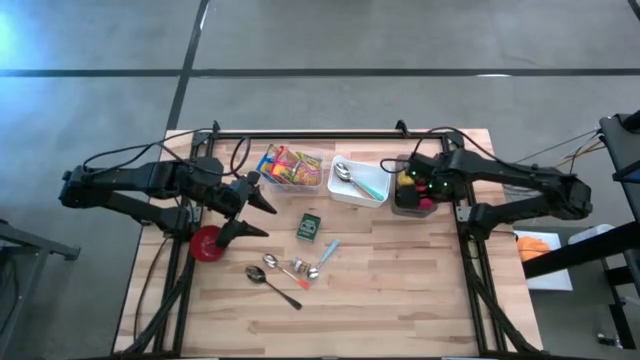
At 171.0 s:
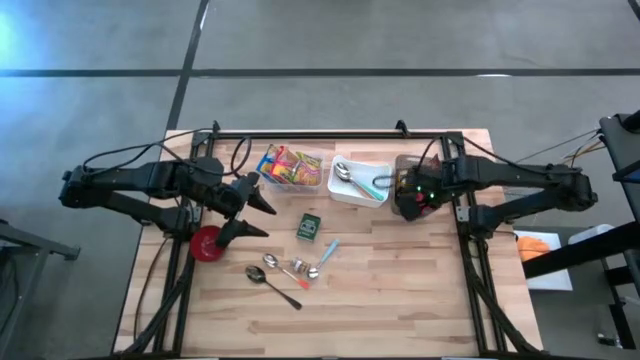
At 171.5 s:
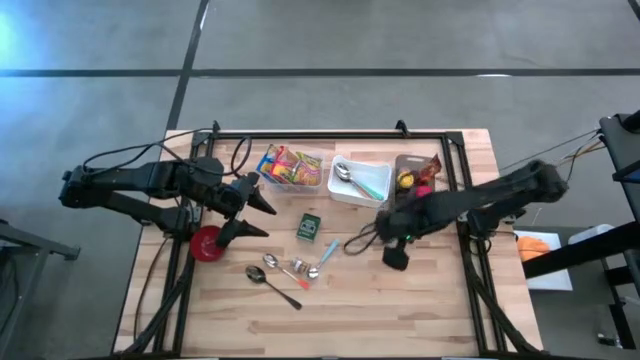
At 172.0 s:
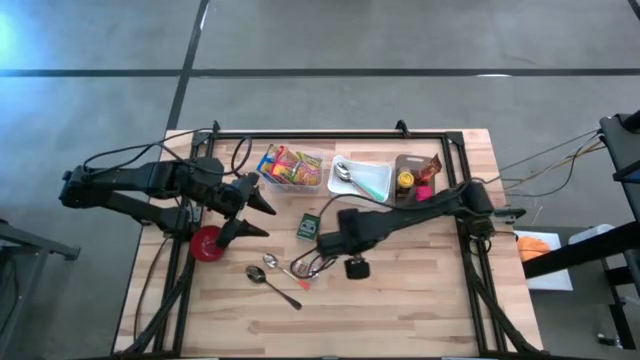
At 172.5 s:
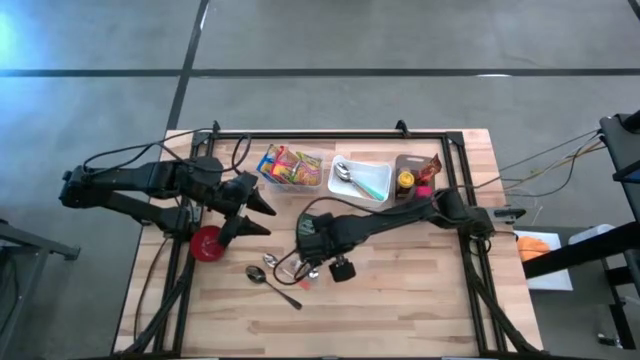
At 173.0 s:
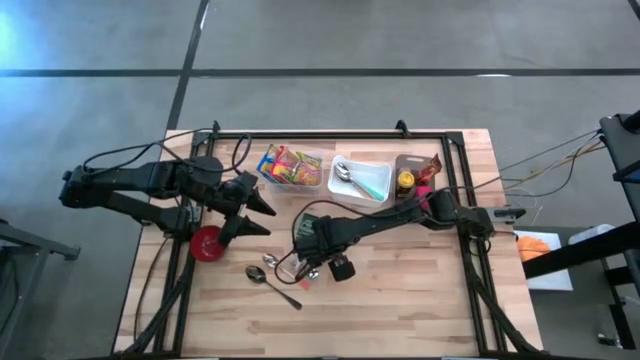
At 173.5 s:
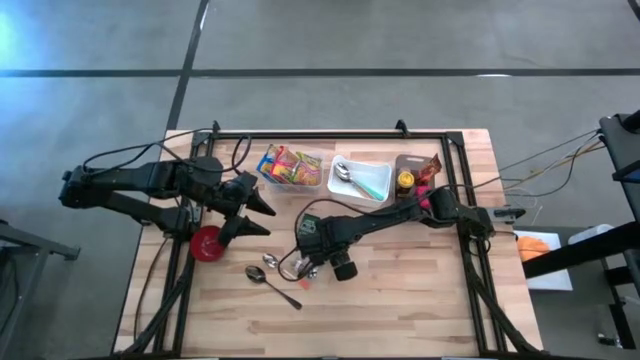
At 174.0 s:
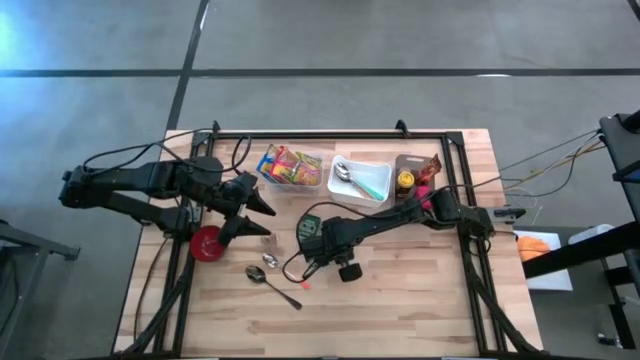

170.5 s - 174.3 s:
Put the light blue spoon into the white bin

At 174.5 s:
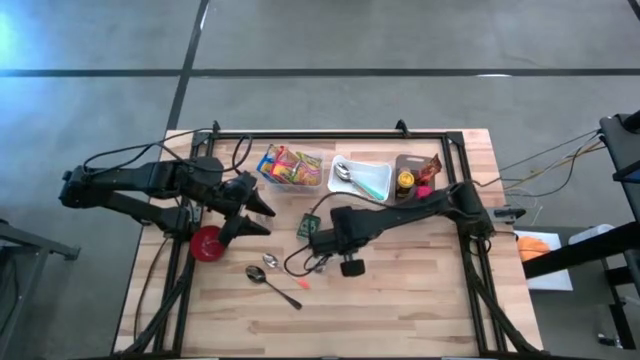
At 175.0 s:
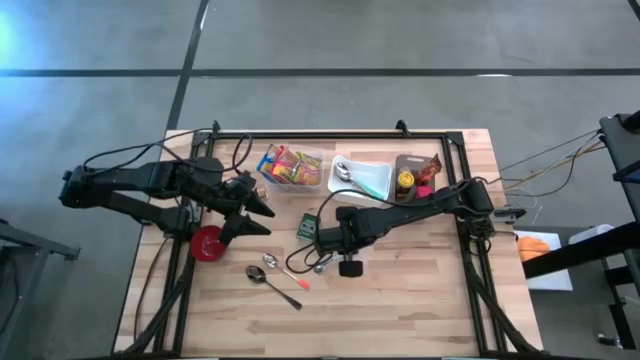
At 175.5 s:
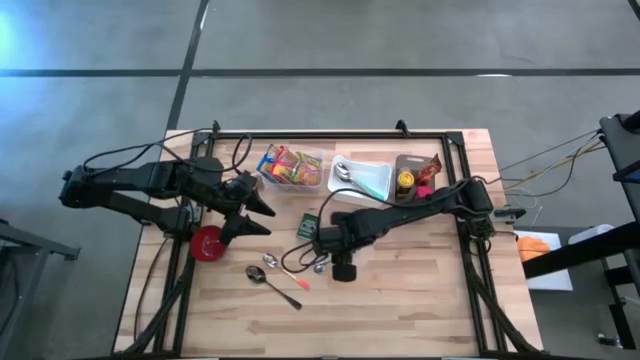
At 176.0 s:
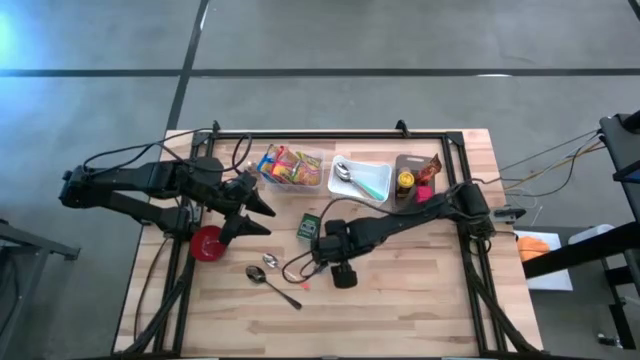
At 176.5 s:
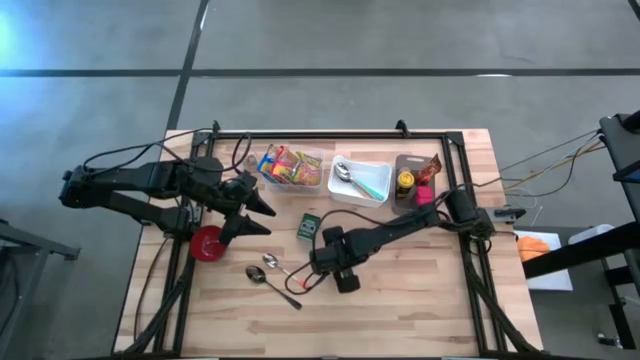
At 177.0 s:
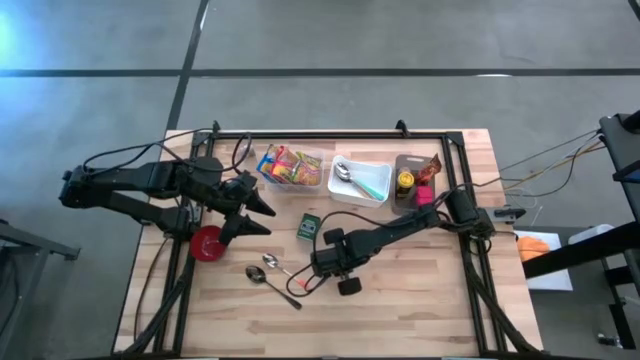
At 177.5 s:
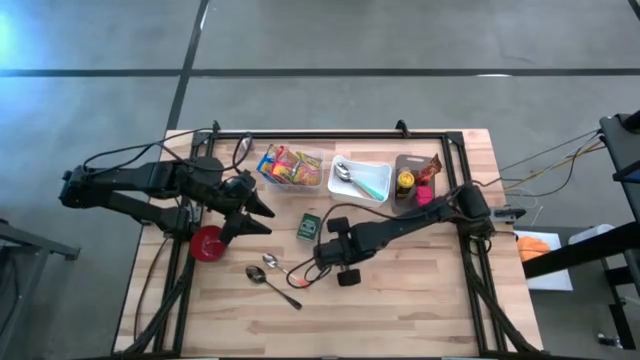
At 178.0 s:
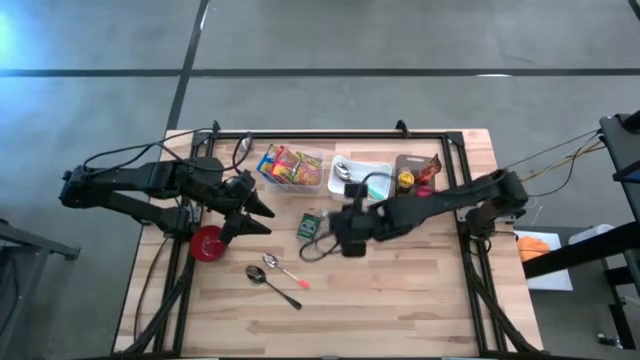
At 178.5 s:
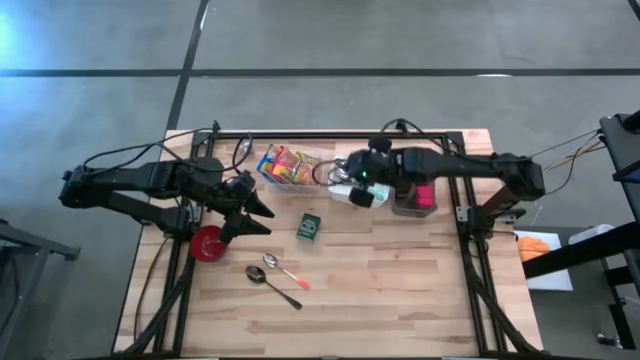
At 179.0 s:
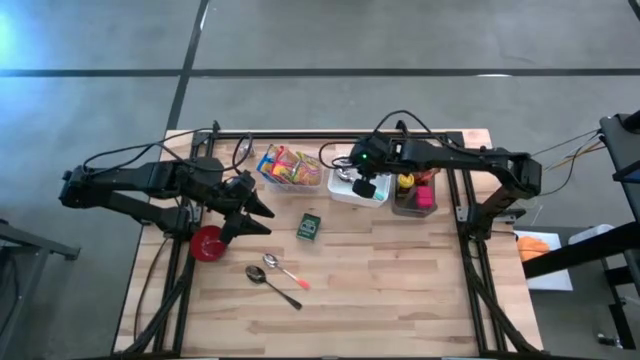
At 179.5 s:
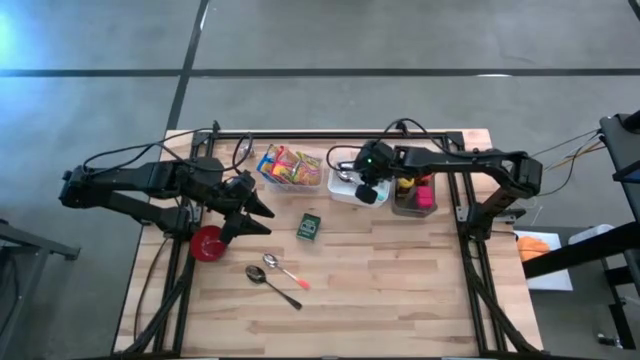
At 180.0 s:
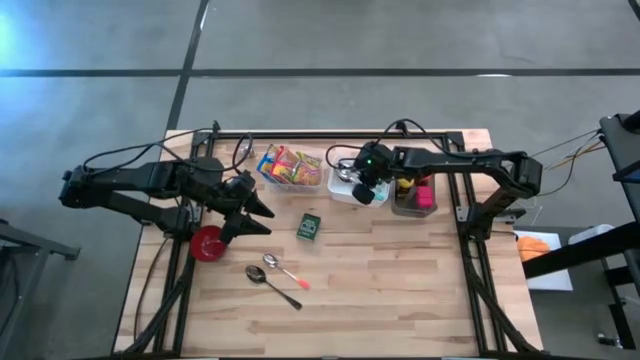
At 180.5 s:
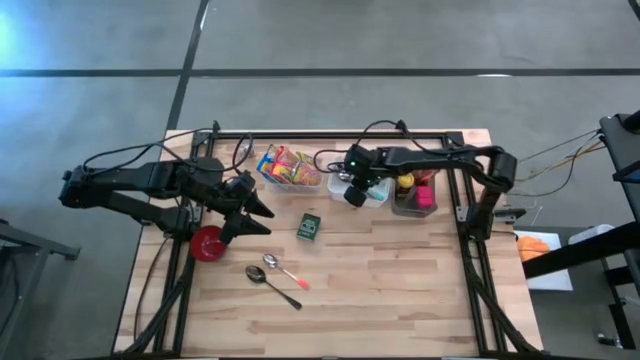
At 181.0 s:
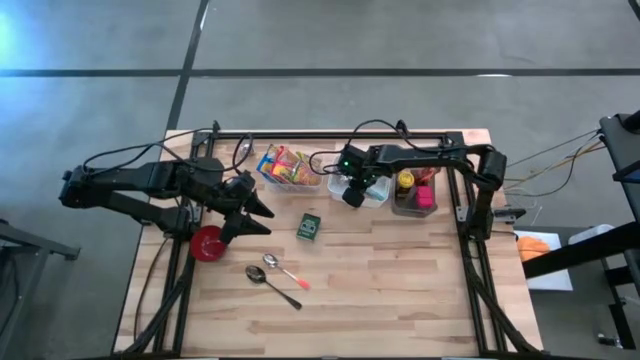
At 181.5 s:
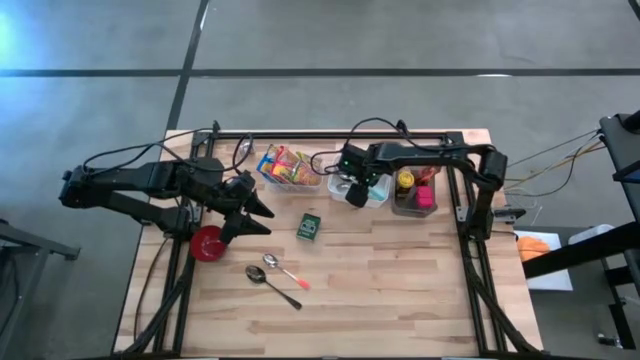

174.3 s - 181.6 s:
Put the light blue spoon into the white bin

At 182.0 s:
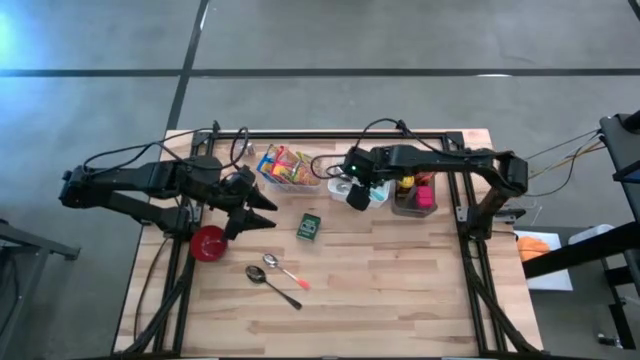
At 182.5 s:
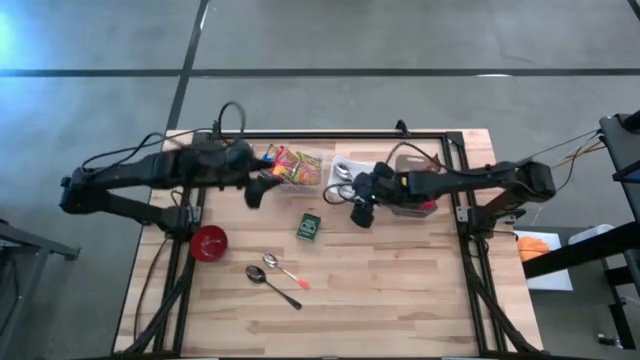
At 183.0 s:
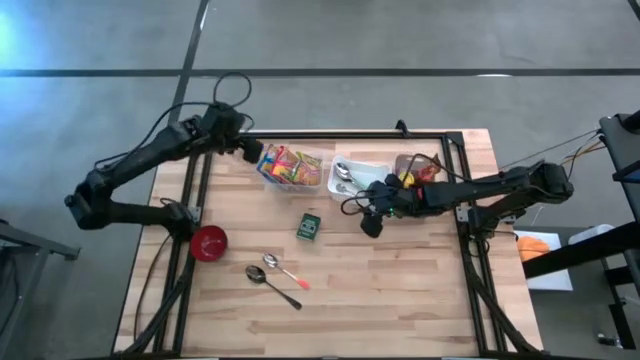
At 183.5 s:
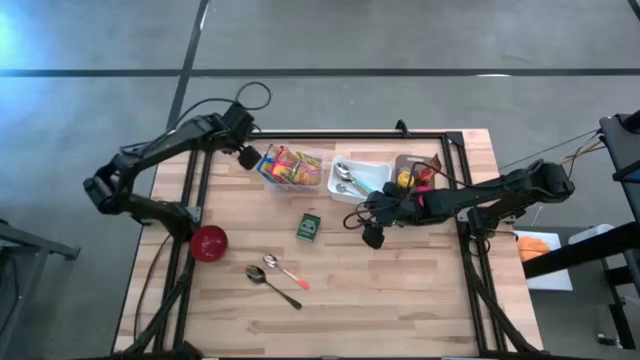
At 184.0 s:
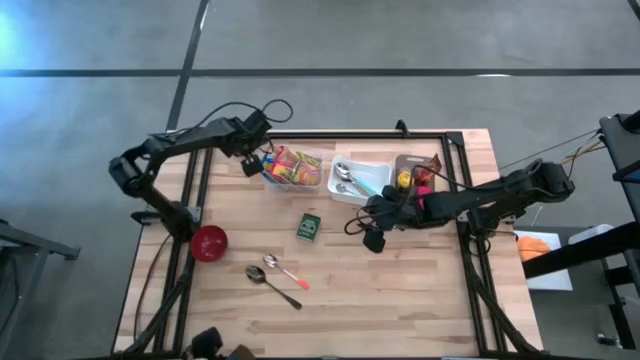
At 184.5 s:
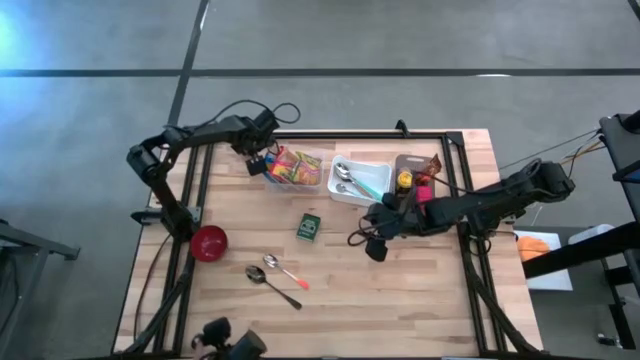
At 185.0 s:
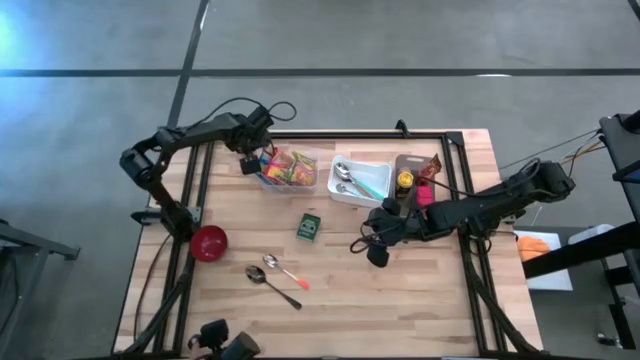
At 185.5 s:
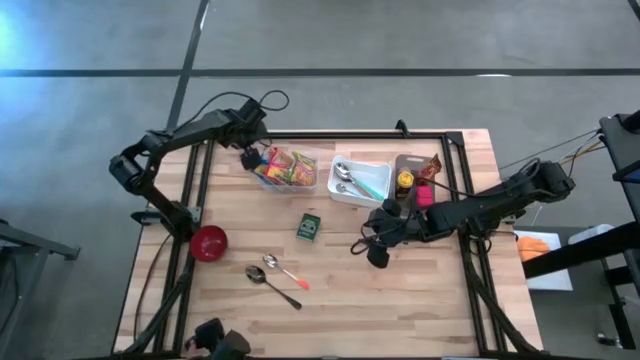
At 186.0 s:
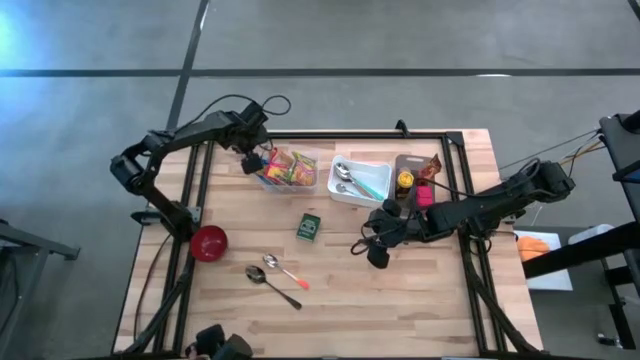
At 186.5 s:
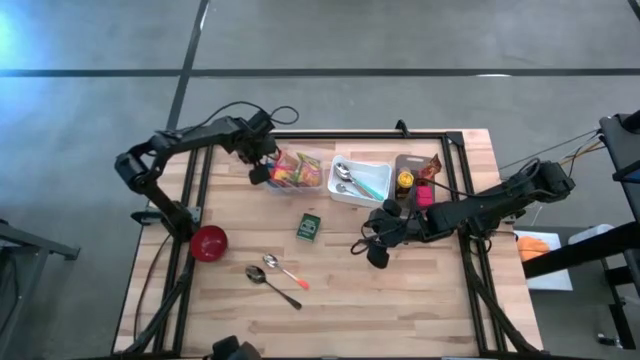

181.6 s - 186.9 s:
Adjust the transparent bin
